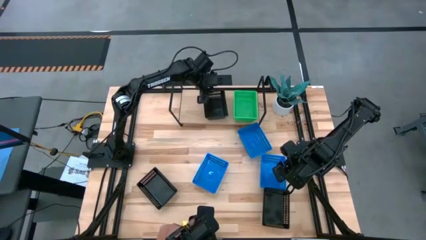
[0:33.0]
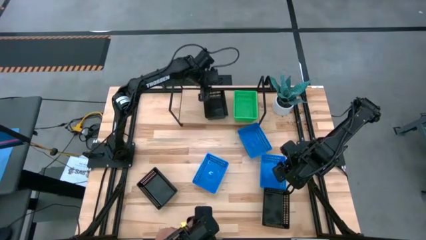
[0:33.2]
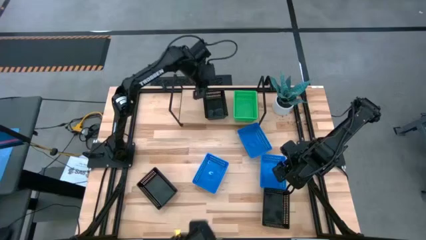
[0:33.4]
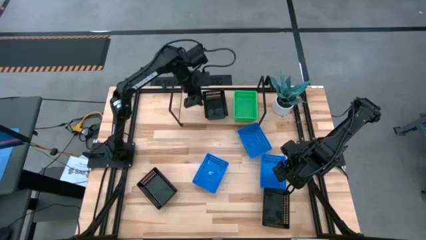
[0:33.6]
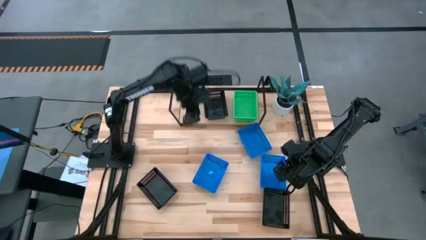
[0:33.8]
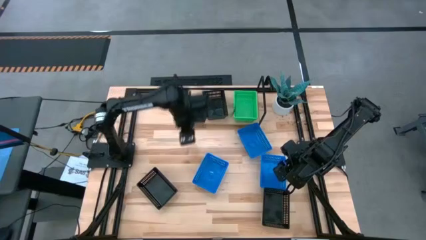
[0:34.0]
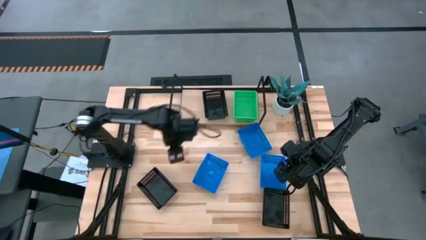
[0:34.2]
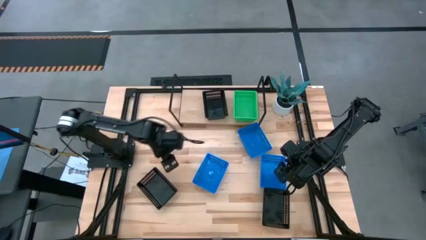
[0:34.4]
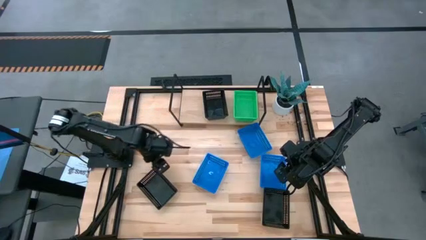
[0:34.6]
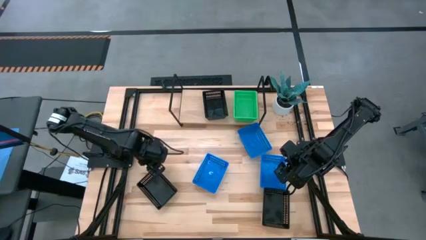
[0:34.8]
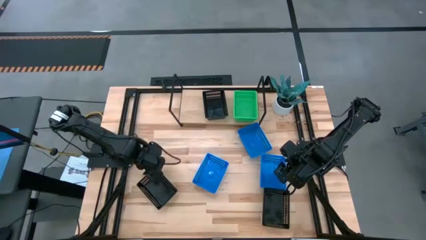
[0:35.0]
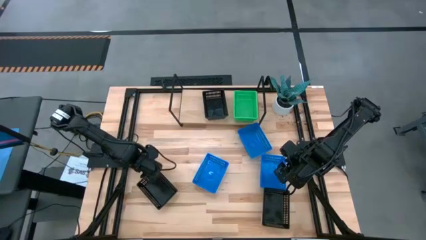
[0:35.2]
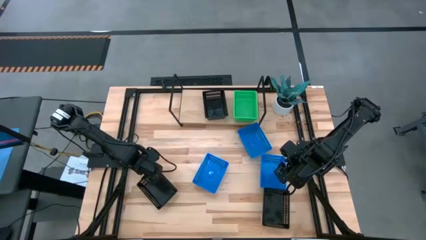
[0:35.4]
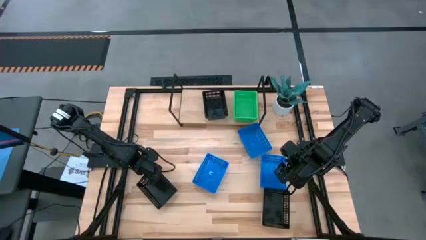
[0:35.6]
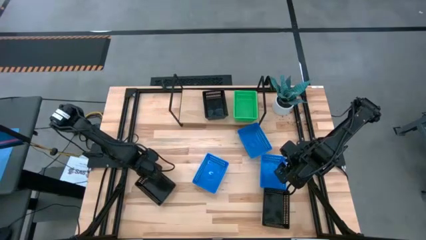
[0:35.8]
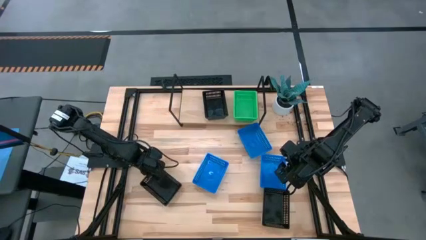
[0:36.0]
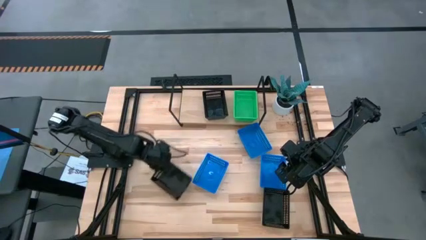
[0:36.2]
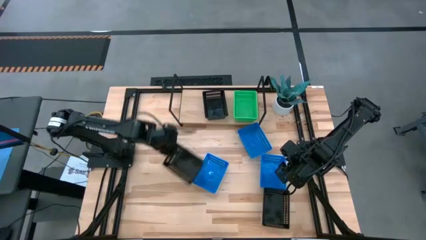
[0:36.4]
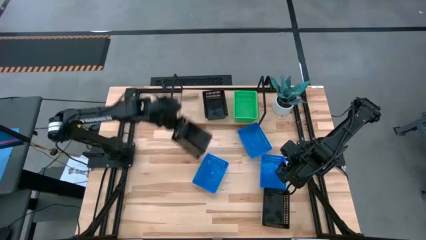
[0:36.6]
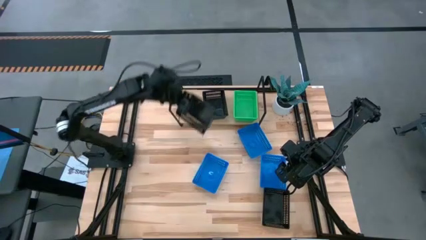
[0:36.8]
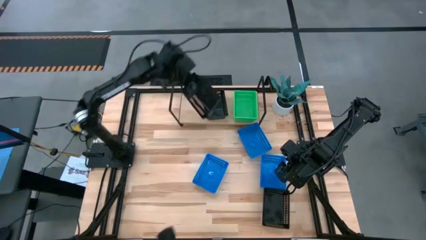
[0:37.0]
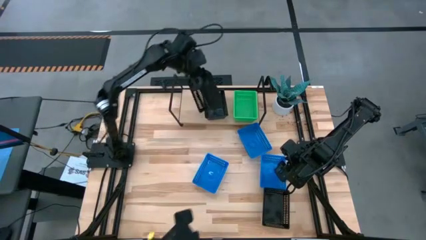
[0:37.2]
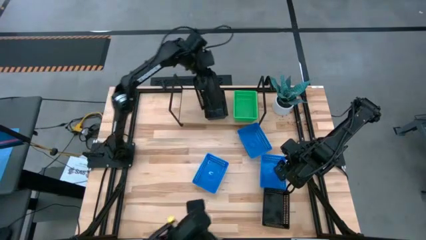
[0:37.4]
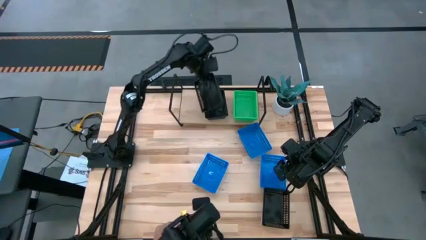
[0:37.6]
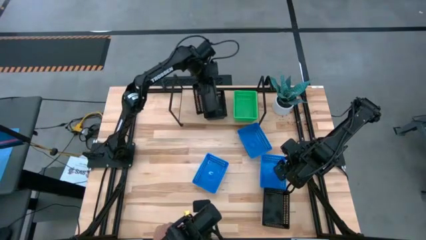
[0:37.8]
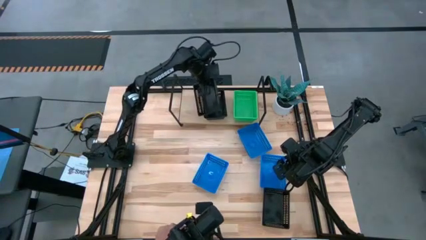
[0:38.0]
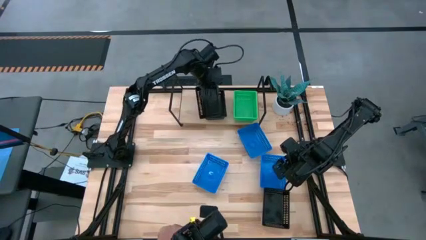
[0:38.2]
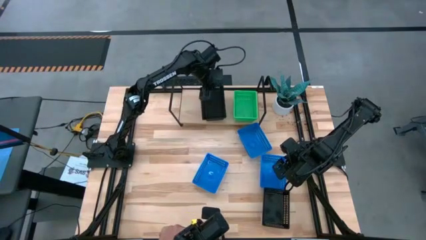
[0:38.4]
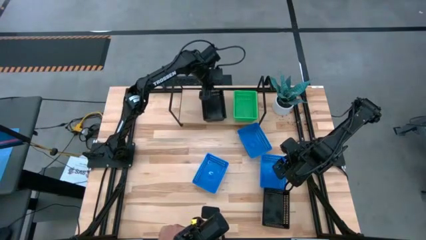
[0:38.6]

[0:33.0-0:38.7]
Task: Stack baskets on shelf by color
Stack the left black bin on top of the other black bin on the shelf

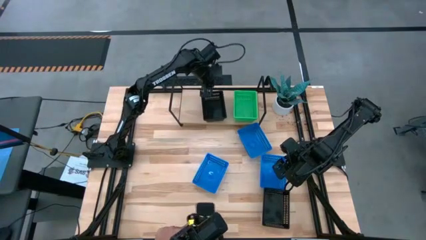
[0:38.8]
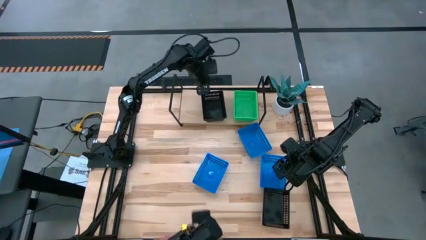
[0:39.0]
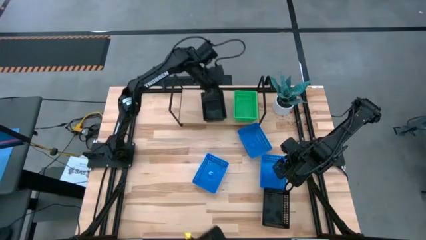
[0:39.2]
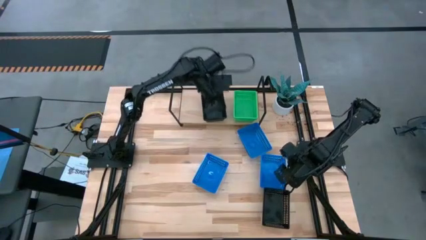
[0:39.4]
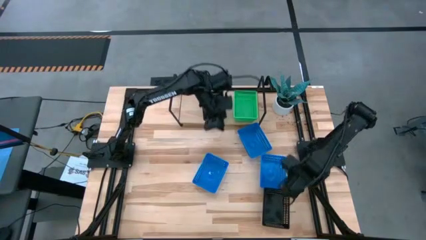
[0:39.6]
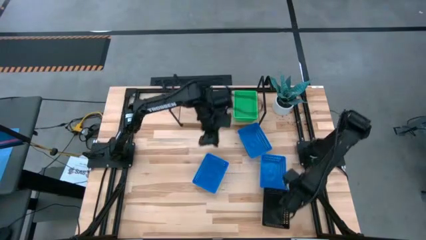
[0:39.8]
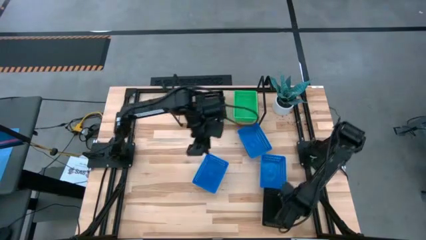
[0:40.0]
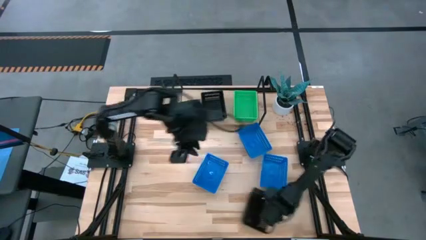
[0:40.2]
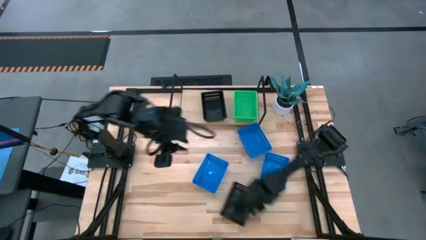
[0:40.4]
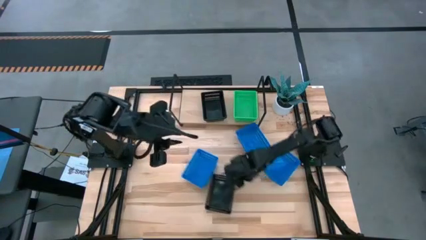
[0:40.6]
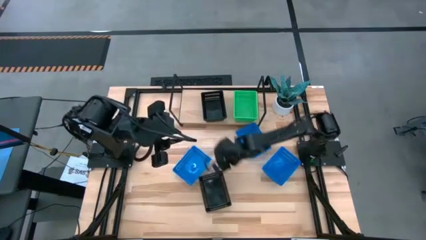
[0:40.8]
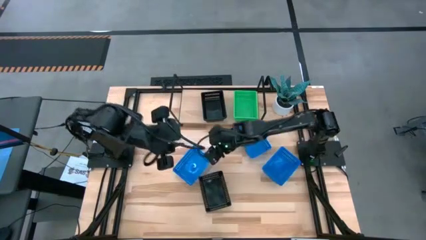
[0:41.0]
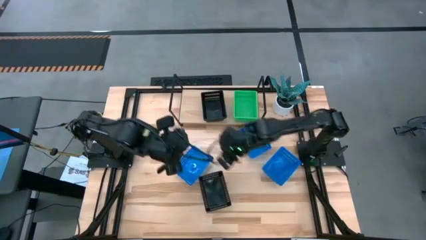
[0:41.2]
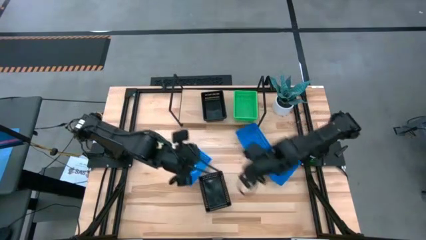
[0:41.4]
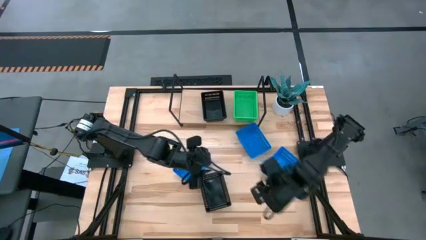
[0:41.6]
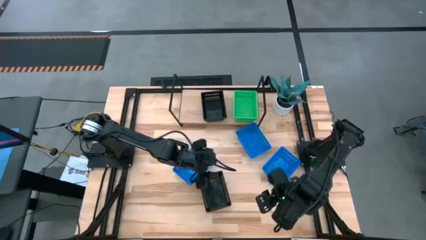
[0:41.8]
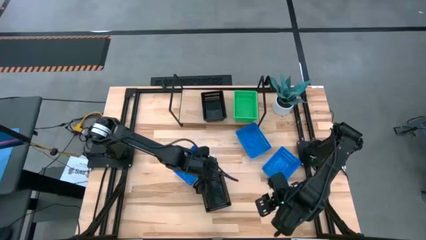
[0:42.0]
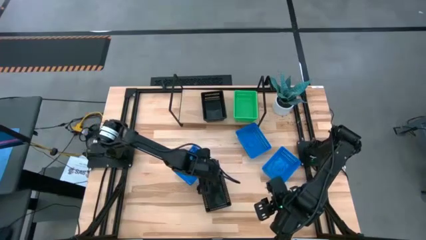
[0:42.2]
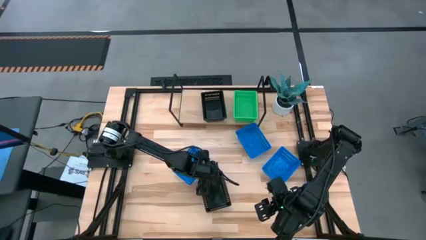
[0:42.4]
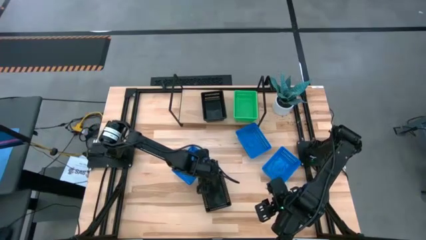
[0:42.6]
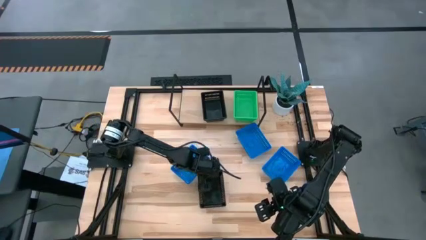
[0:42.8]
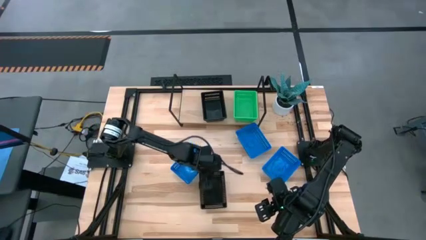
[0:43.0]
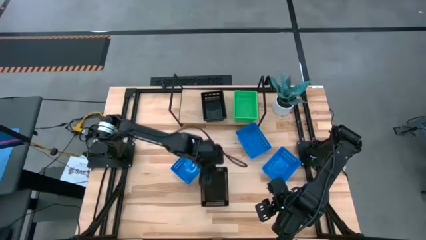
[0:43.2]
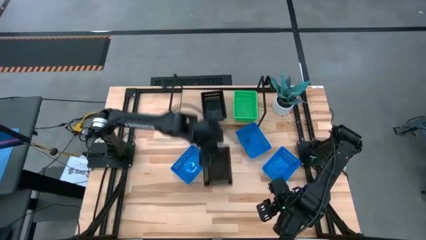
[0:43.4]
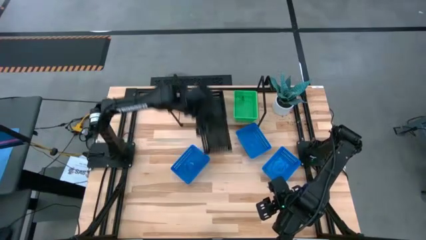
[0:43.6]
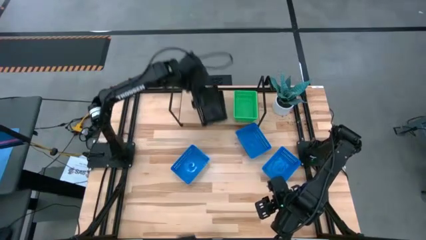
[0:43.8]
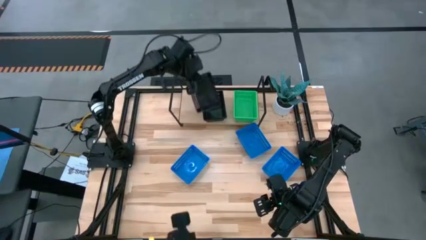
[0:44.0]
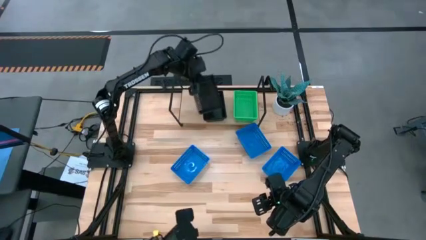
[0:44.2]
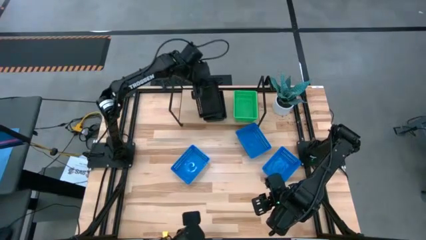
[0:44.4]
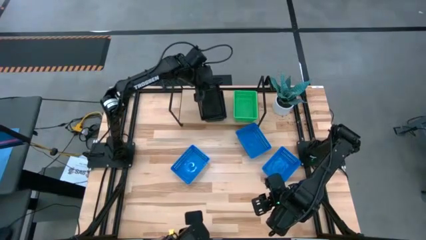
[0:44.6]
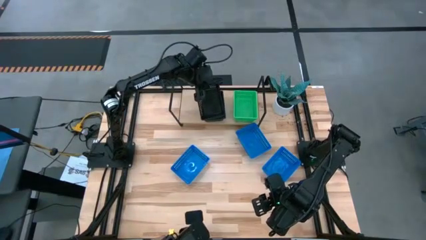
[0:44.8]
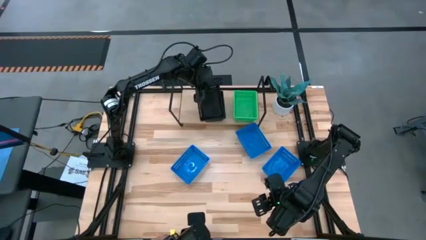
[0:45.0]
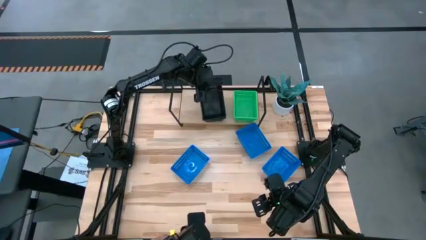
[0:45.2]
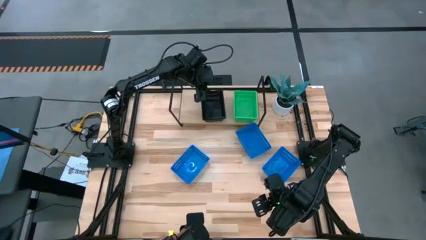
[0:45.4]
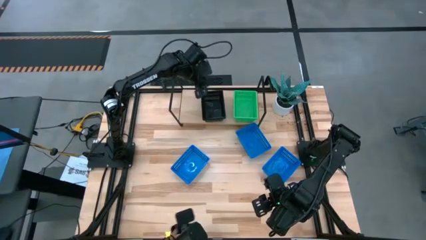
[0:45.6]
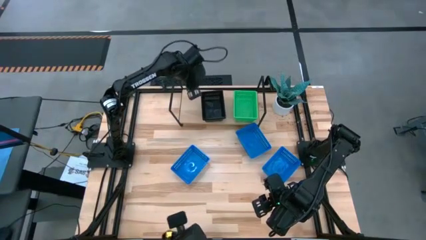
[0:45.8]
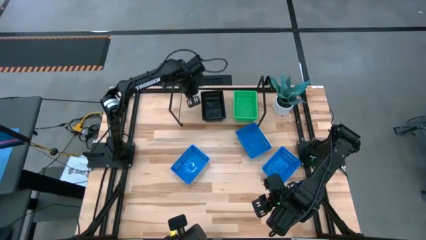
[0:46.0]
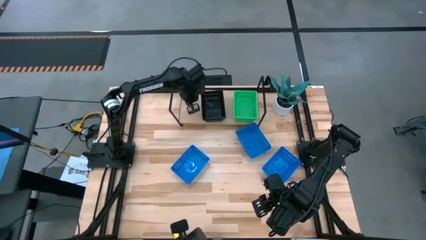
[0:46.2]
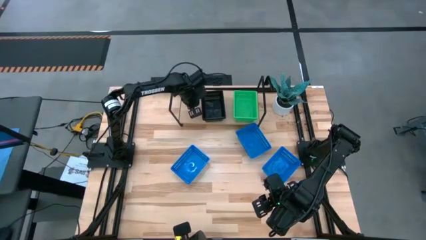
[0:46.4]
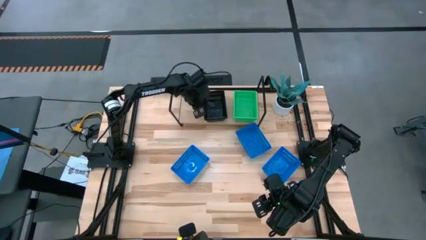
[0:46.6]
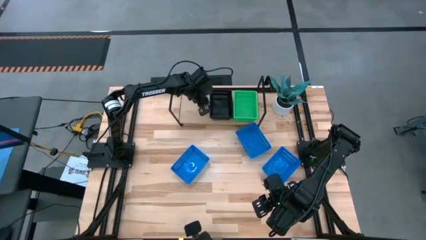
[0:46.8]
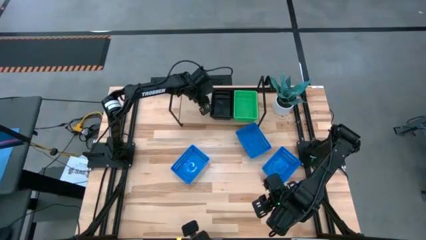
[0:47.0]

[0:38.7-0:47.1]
Stack the black bin on top of the other black bin on the shelf

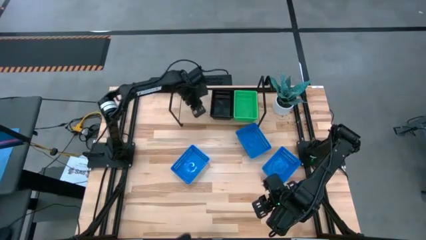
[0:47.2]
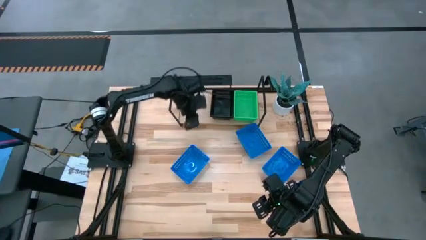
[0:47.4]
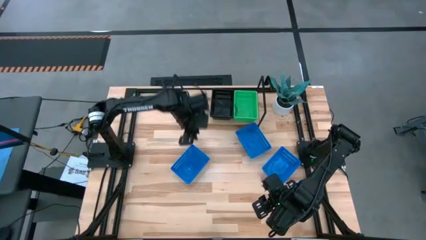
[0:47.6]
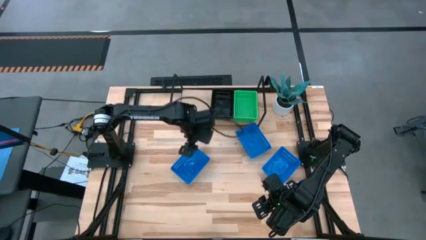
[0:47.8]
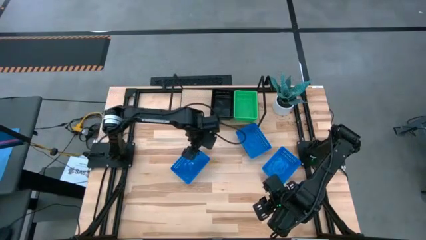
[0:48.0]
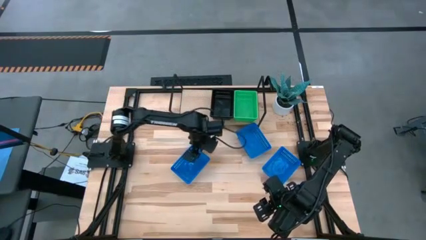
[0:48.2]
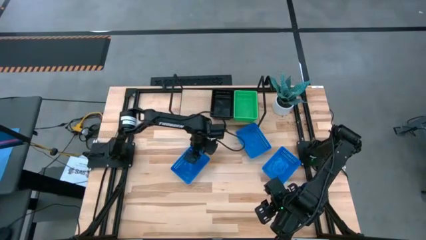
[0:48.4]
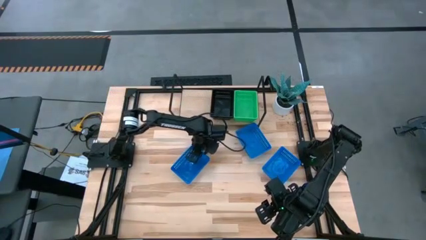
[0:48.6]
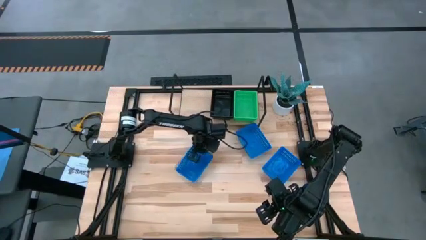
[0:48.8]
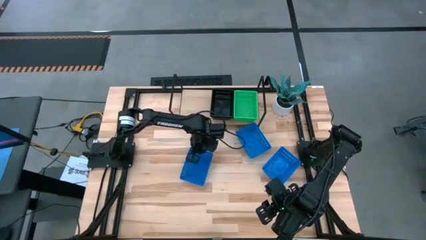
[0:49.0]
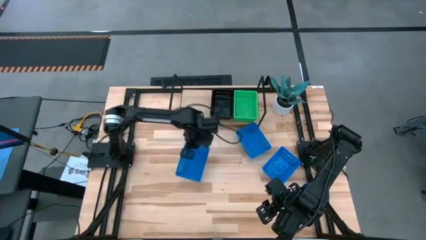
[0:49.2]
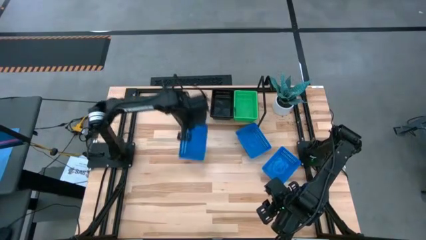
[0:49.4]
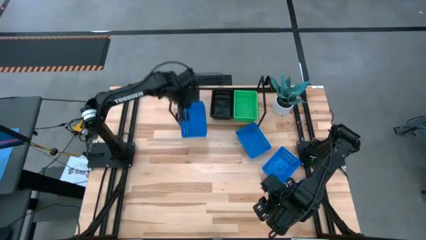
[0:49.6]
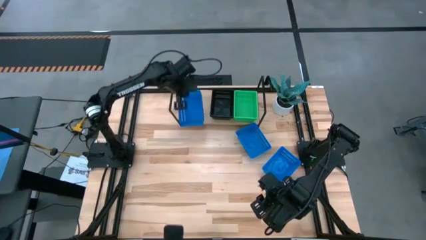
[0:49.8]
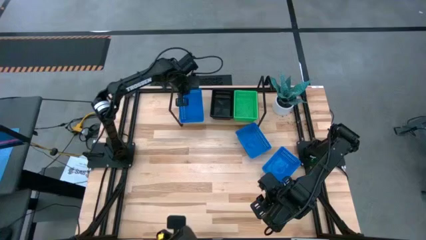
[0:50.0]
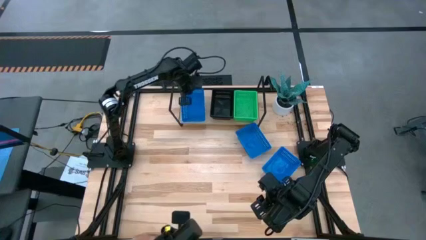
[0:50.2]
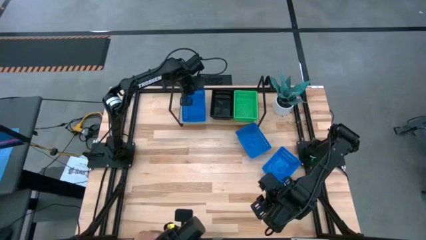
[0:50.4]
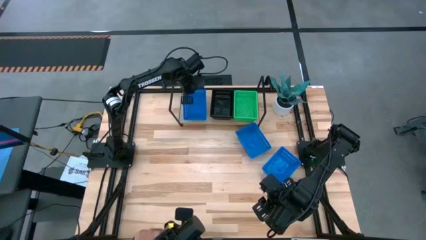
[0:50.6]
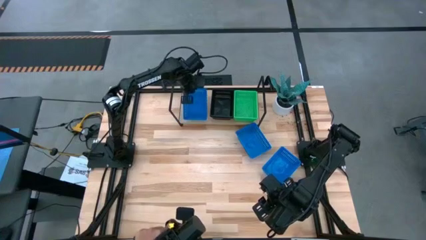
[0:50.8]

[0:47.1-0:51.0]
Put the left blue bin on the shelf
